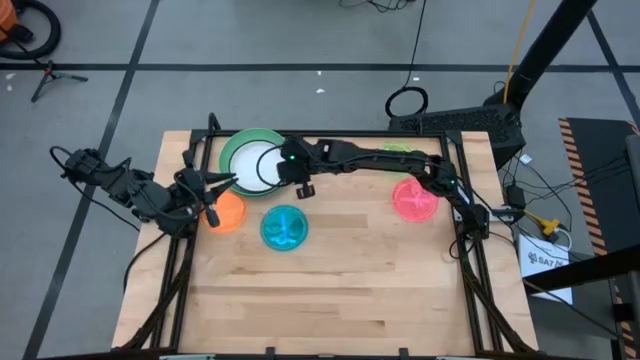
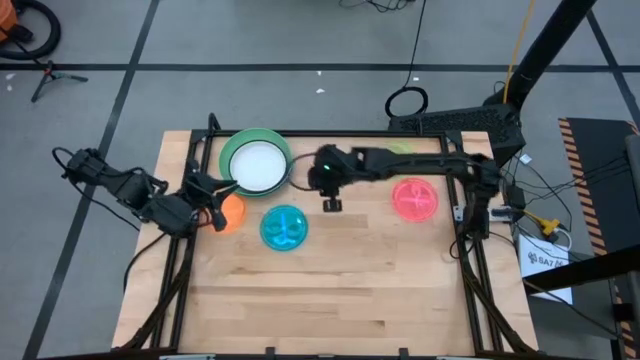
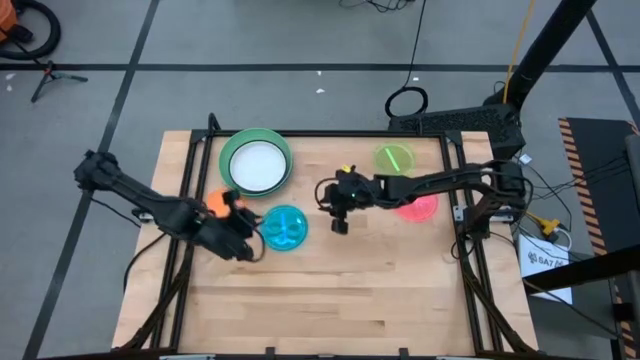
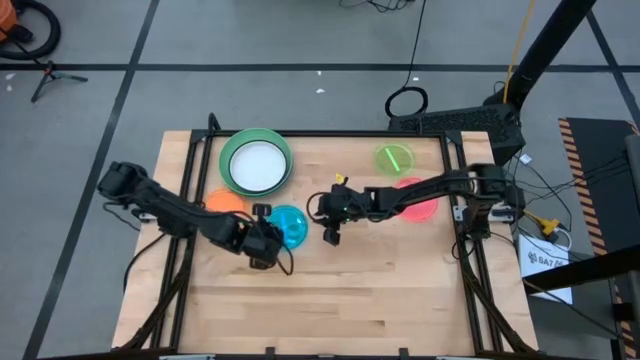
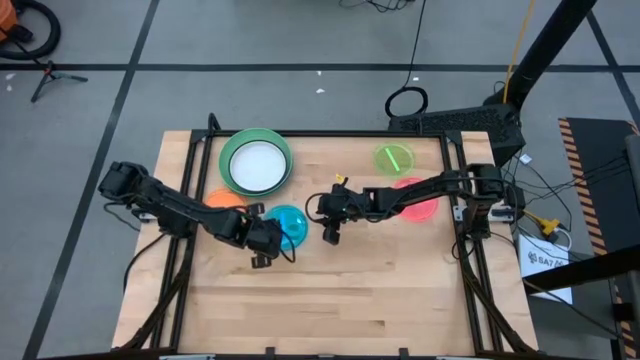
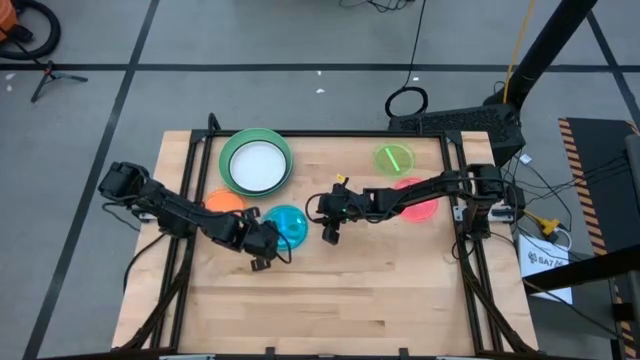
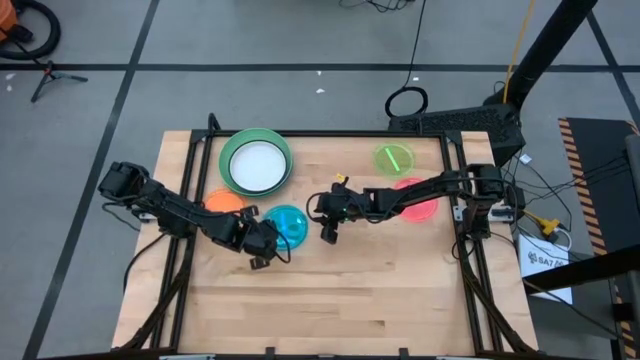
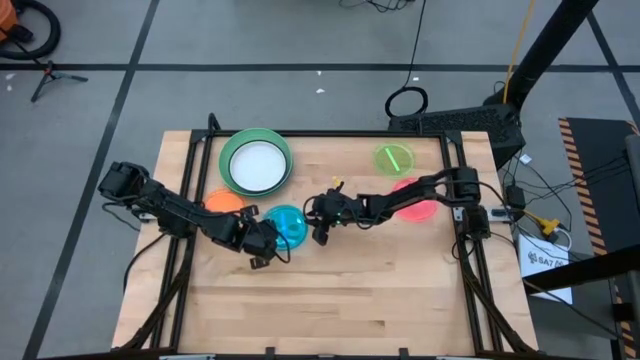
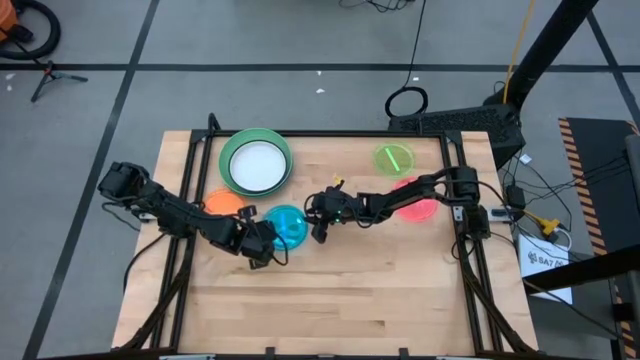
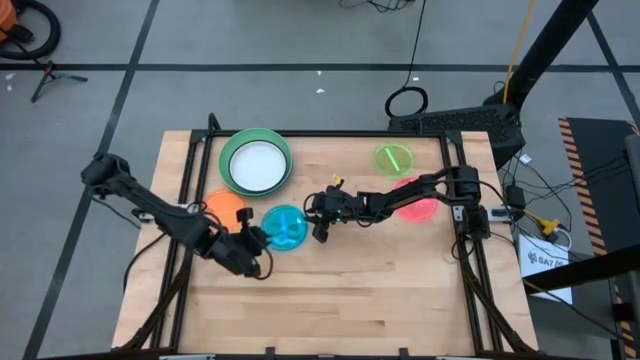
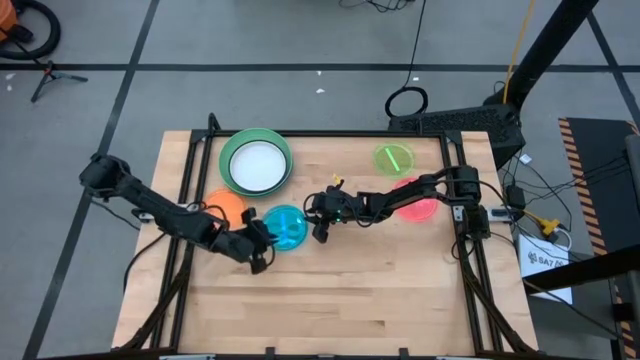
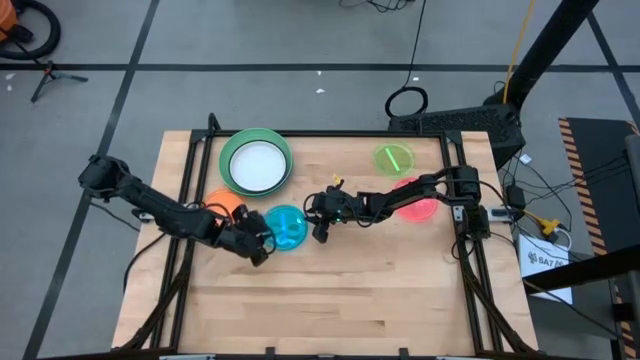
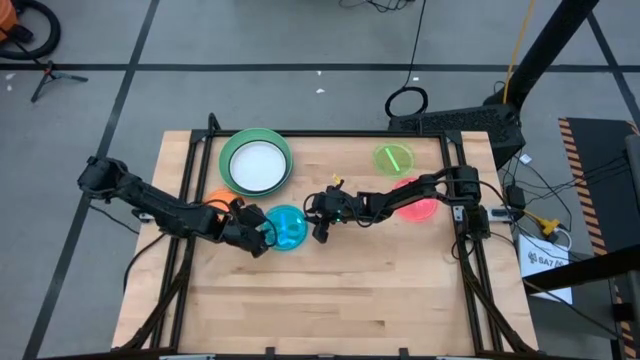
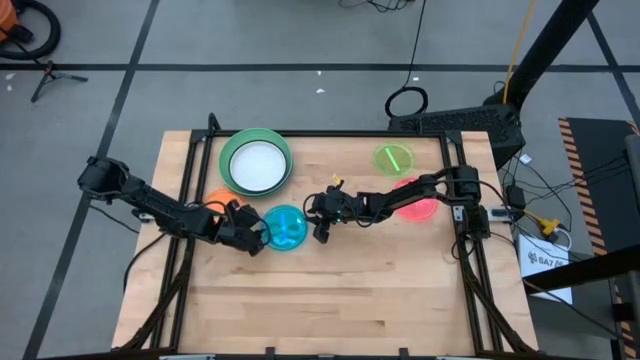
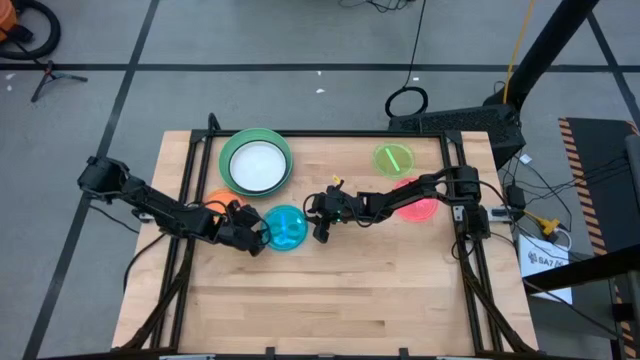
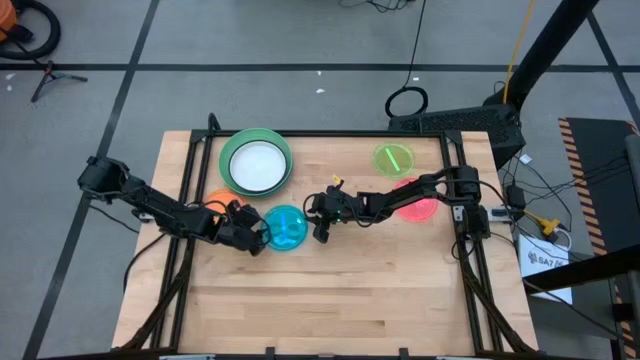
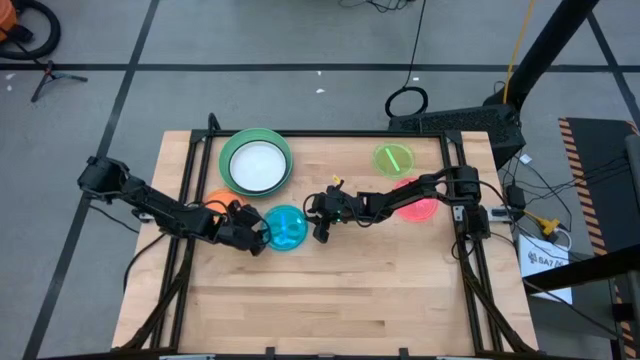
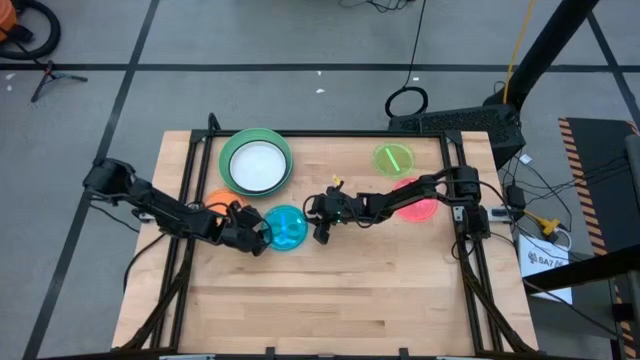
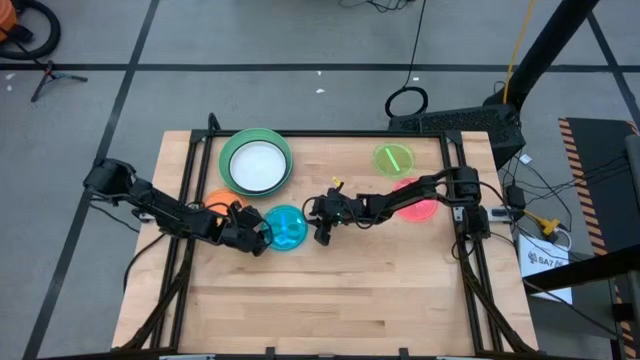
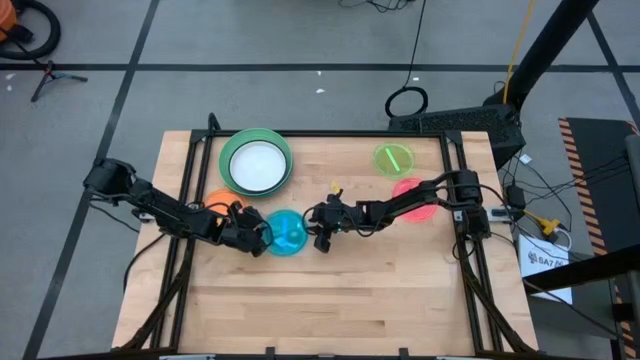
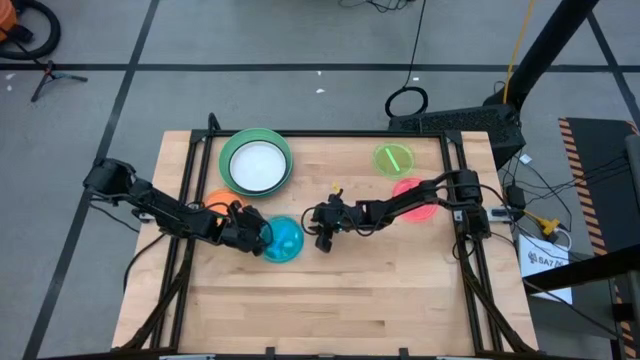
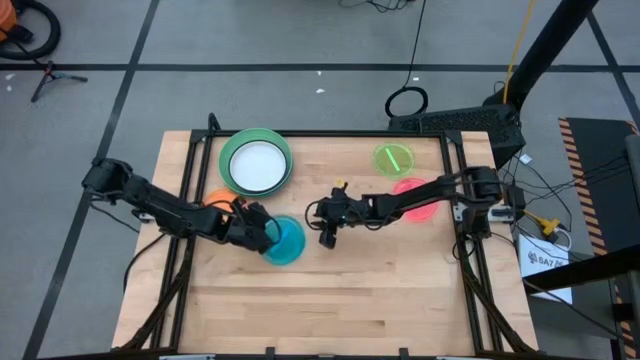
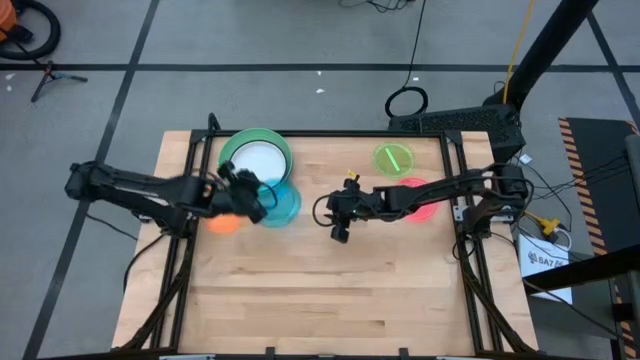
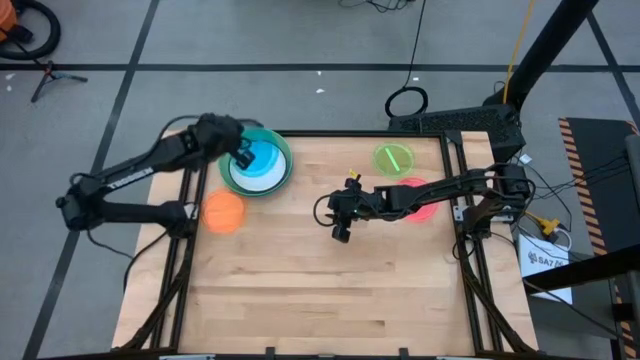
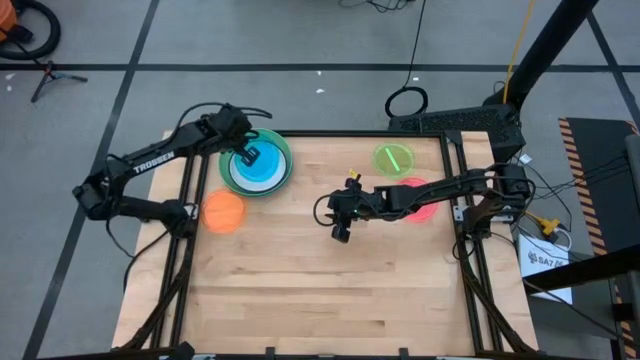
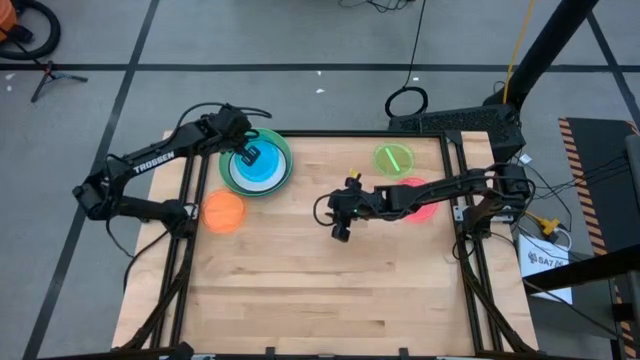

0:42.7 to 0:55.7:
Task: Stack plastic plates
Stack the small blue plate on top of the medium white plate

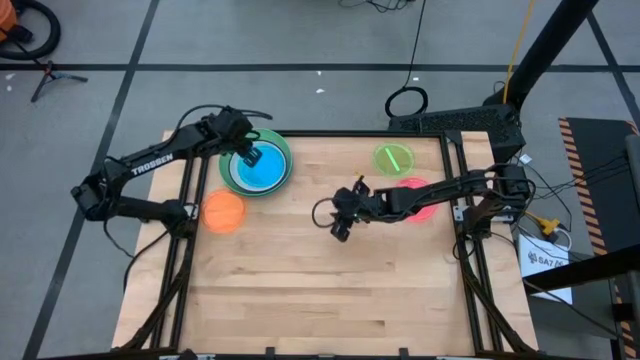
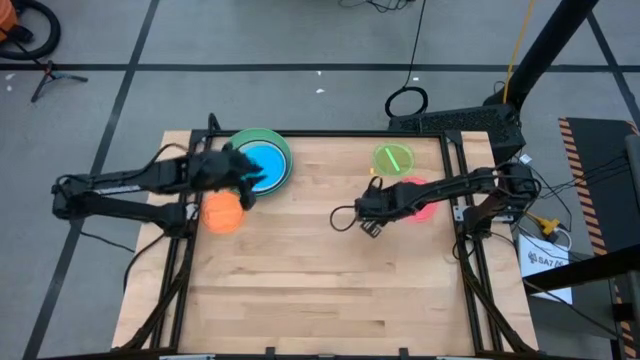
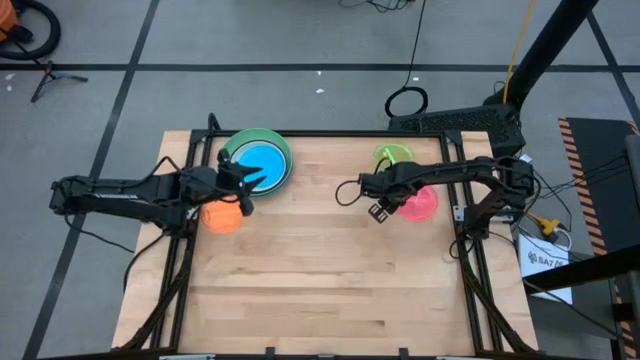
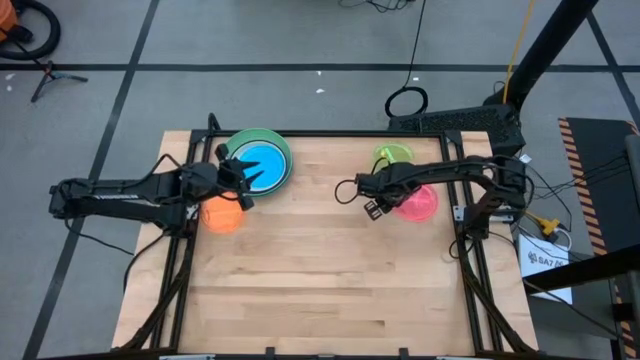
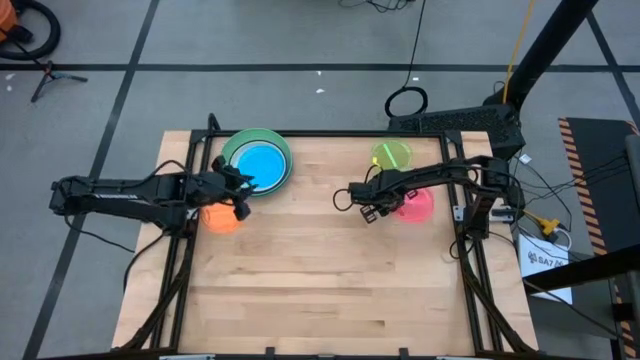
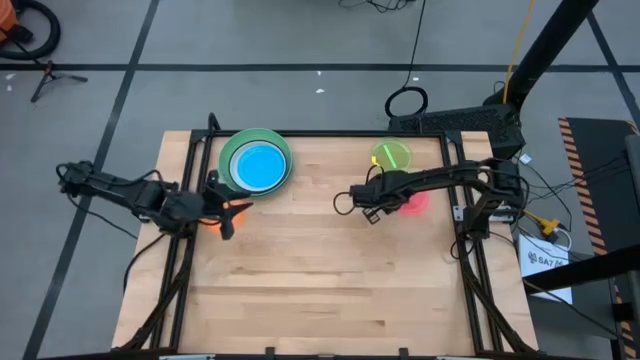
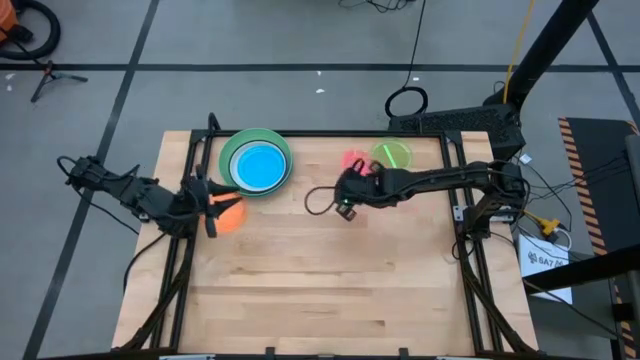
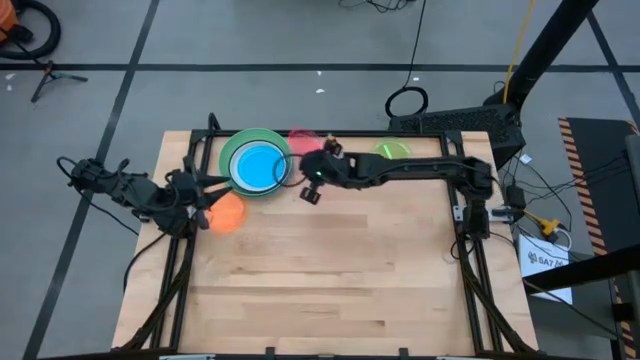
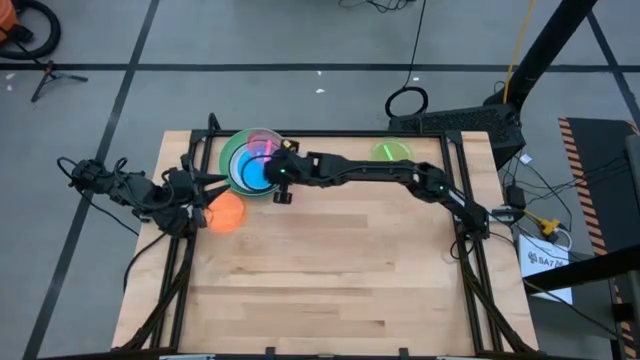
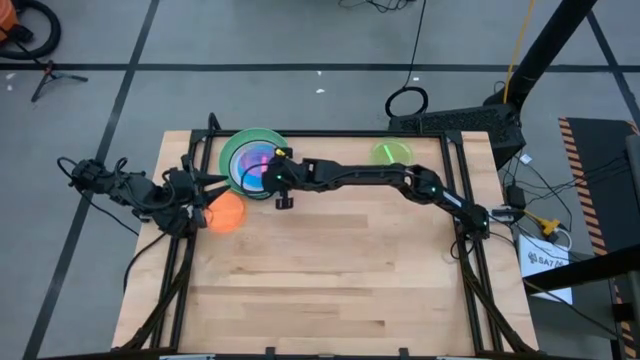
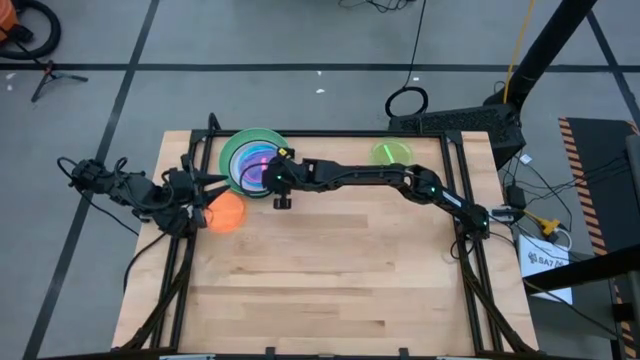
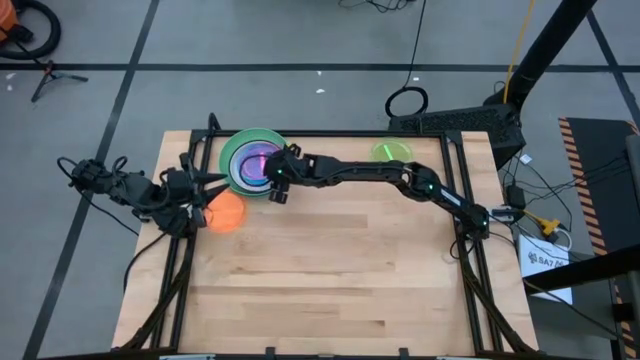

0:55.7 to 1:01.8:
Stack the small pink plate on top of the small blue plate

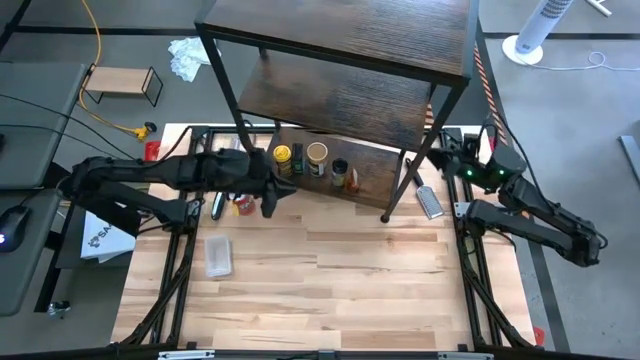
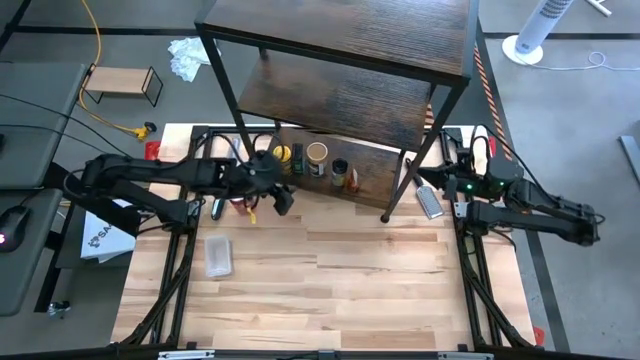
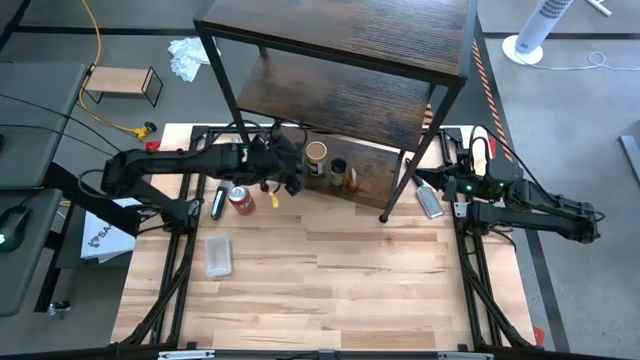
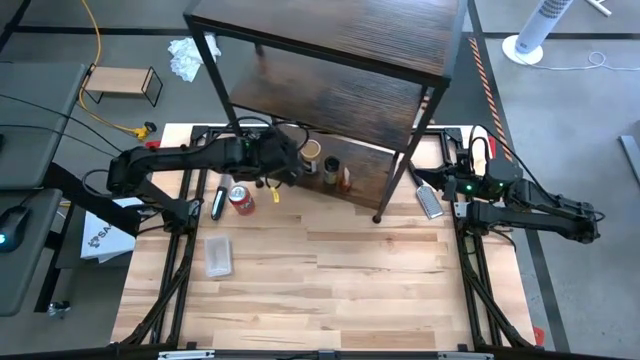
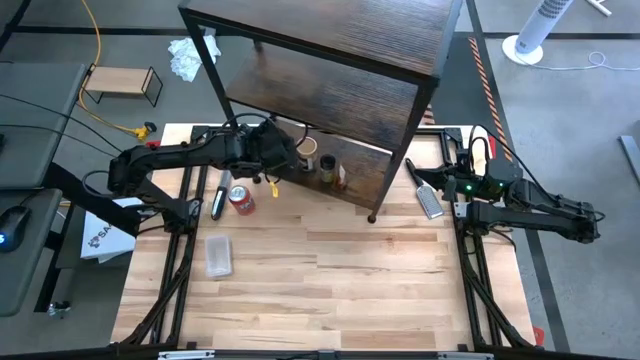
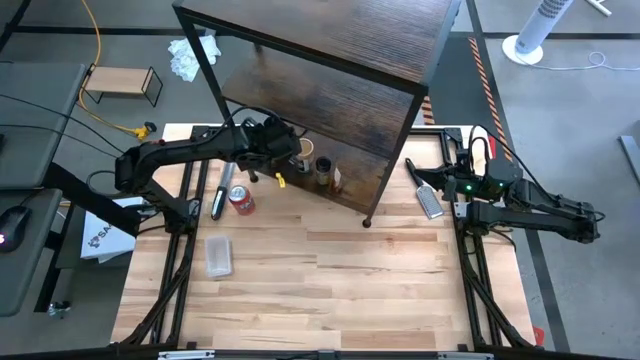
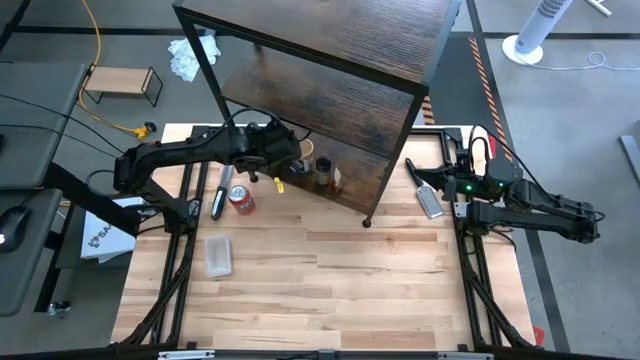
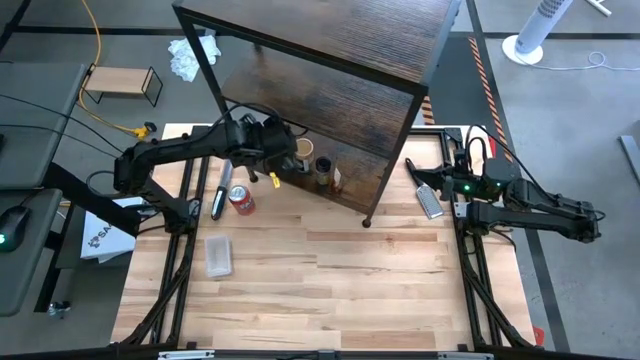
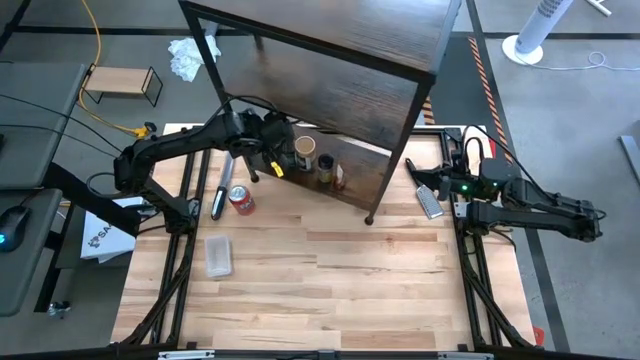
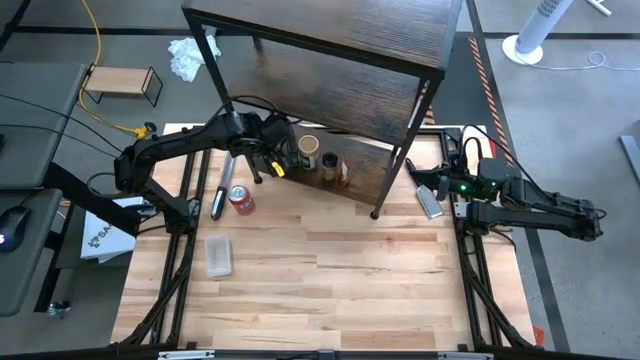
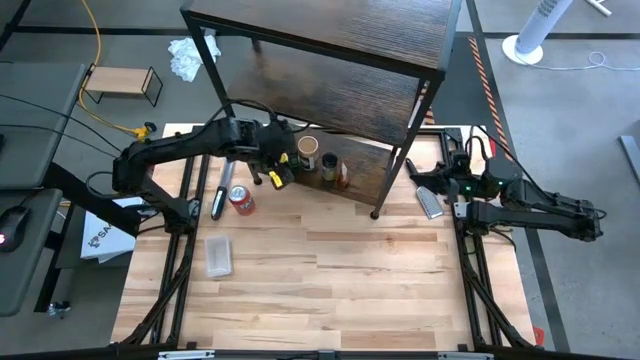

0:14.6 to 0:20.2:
Task: Shelf spices
Adjust the yellow seasoning bottle
